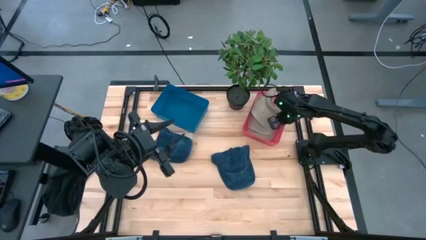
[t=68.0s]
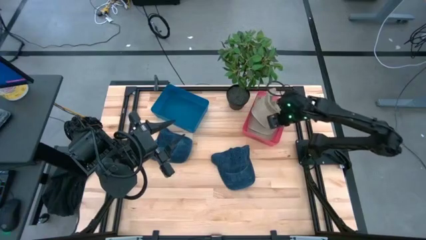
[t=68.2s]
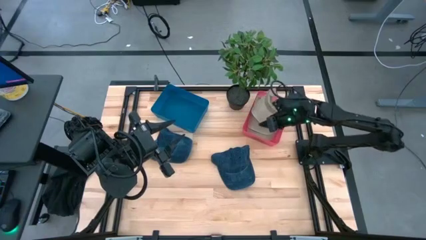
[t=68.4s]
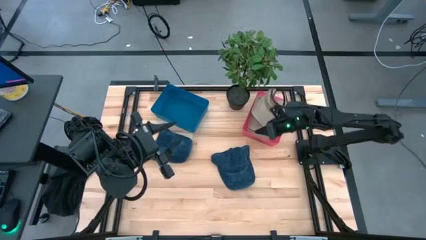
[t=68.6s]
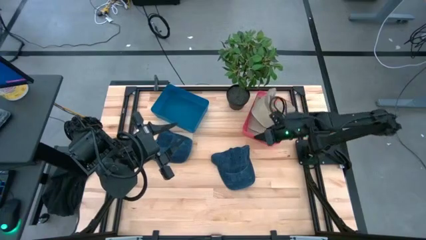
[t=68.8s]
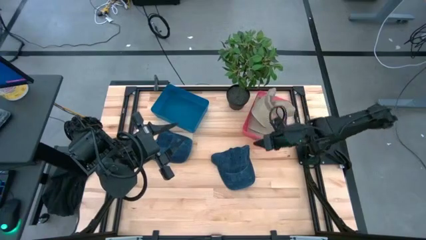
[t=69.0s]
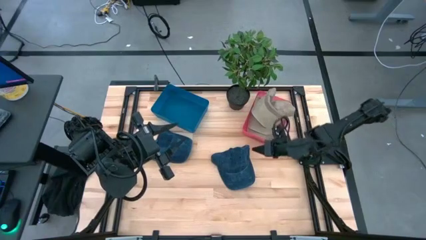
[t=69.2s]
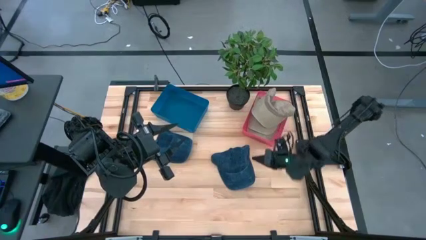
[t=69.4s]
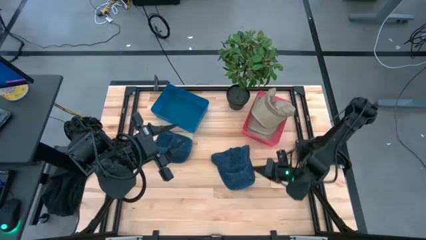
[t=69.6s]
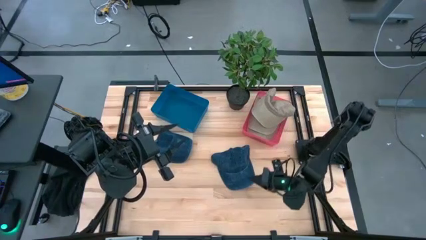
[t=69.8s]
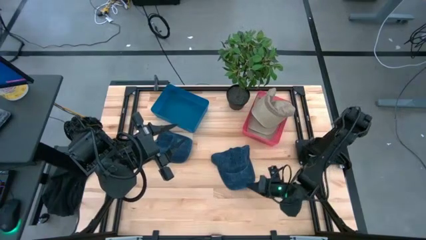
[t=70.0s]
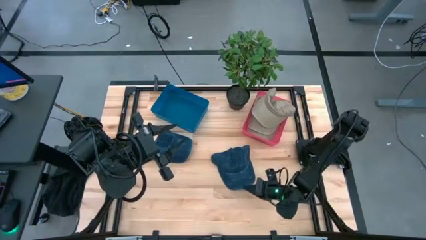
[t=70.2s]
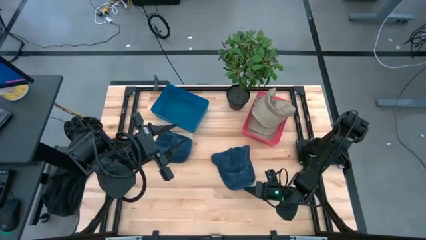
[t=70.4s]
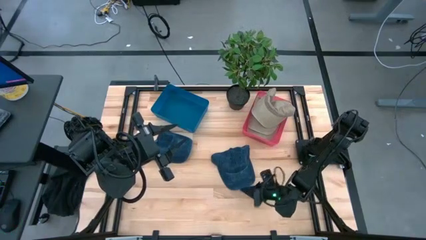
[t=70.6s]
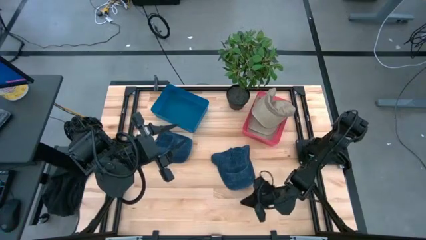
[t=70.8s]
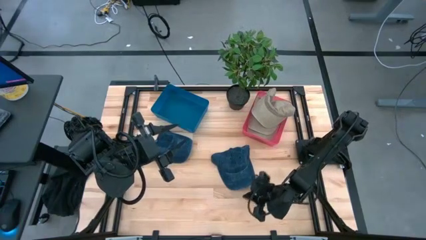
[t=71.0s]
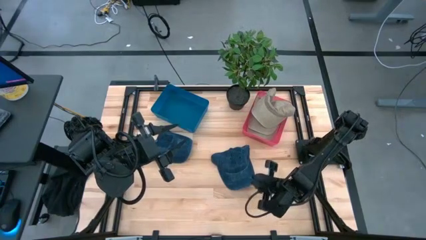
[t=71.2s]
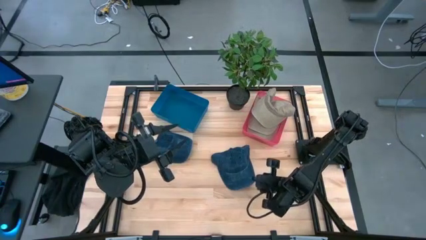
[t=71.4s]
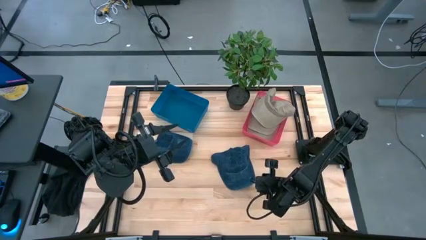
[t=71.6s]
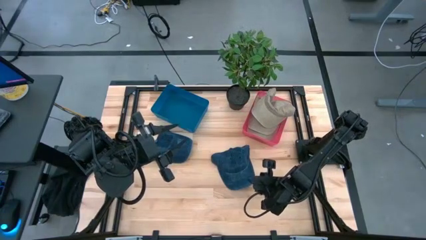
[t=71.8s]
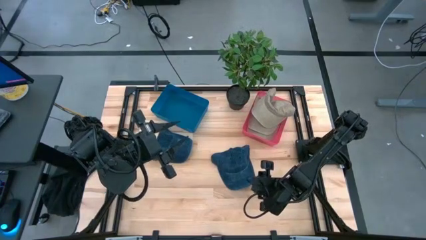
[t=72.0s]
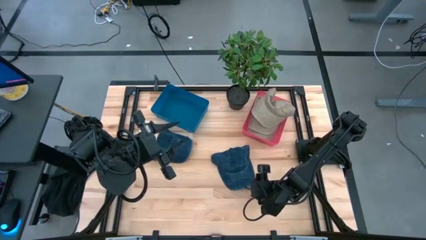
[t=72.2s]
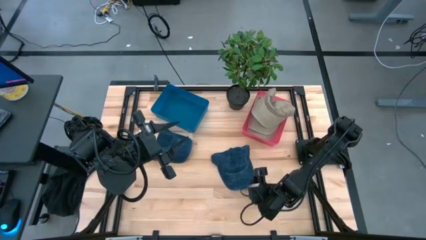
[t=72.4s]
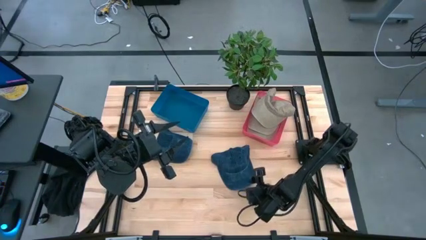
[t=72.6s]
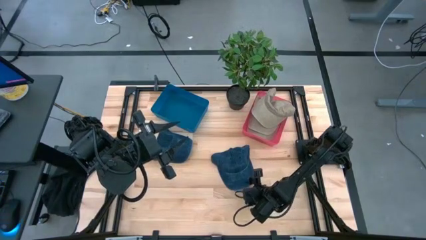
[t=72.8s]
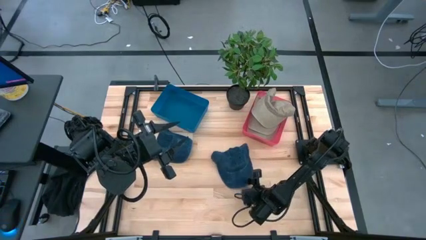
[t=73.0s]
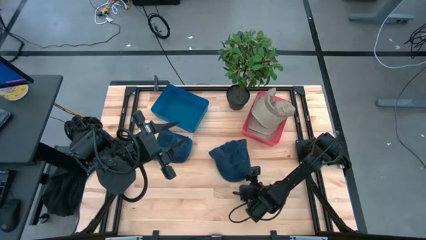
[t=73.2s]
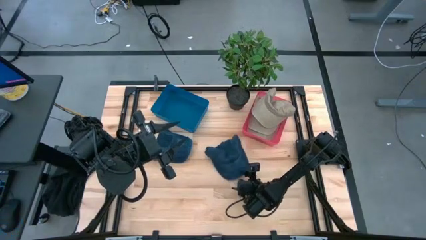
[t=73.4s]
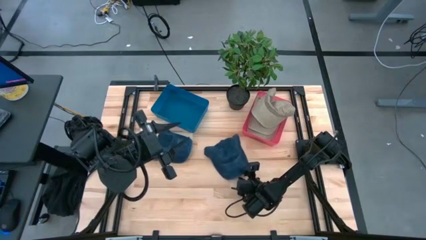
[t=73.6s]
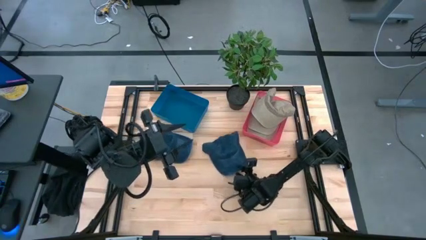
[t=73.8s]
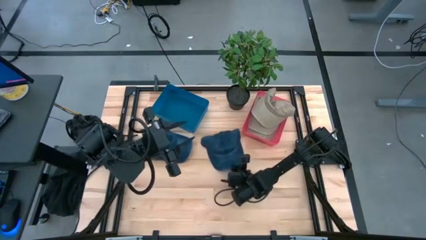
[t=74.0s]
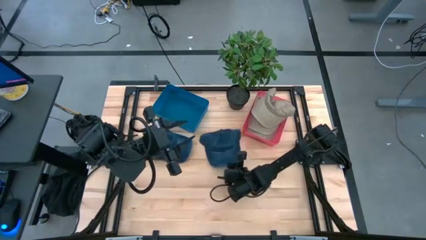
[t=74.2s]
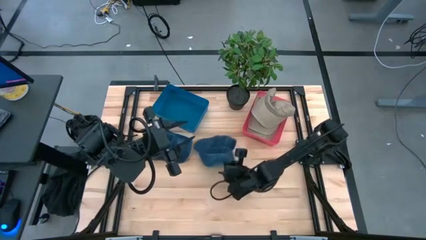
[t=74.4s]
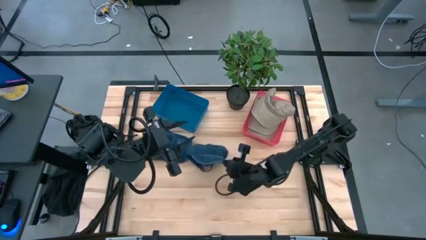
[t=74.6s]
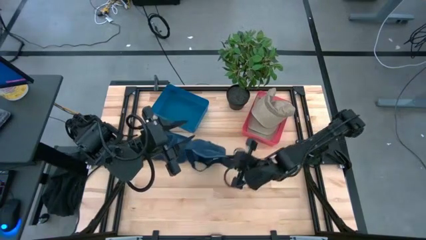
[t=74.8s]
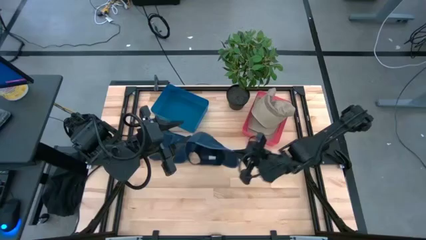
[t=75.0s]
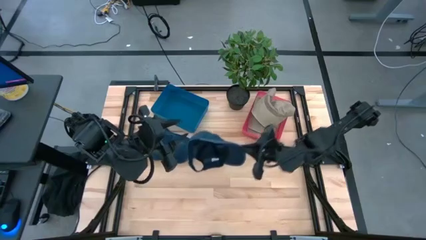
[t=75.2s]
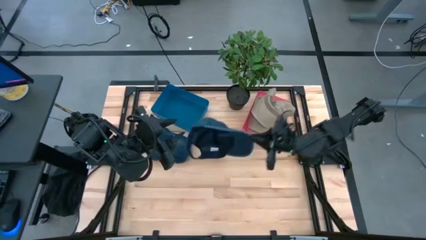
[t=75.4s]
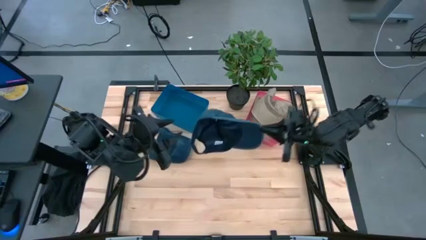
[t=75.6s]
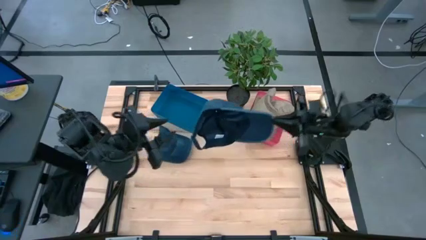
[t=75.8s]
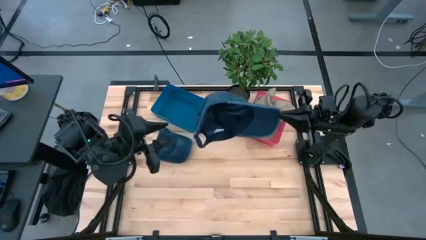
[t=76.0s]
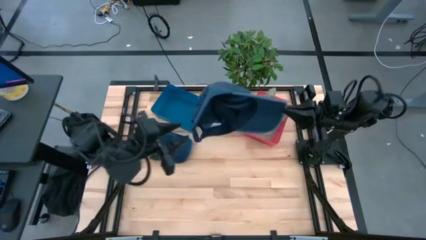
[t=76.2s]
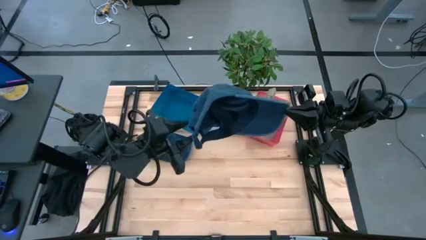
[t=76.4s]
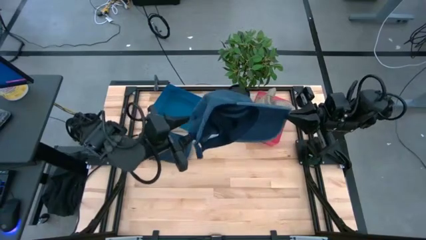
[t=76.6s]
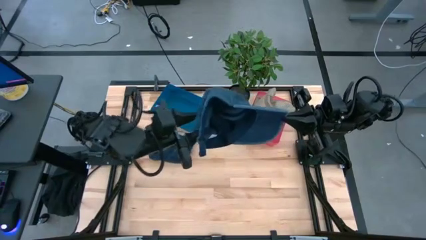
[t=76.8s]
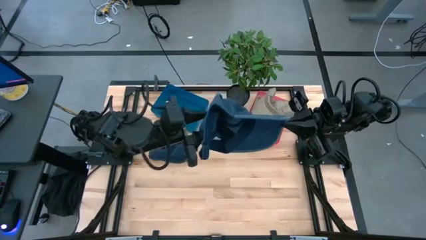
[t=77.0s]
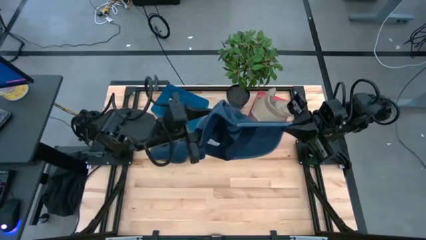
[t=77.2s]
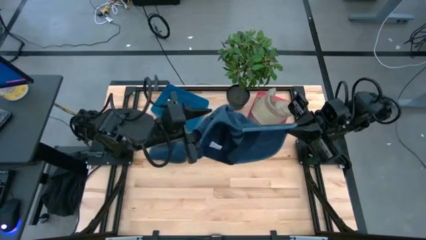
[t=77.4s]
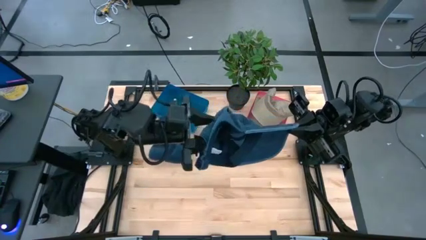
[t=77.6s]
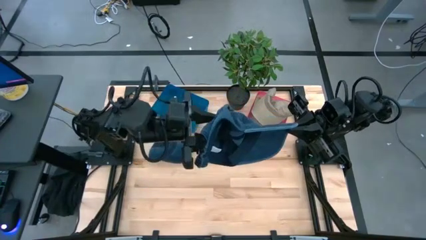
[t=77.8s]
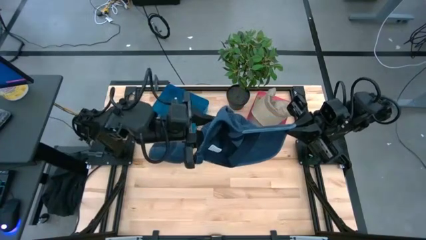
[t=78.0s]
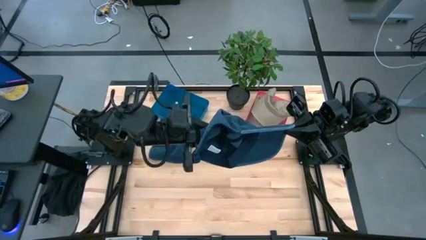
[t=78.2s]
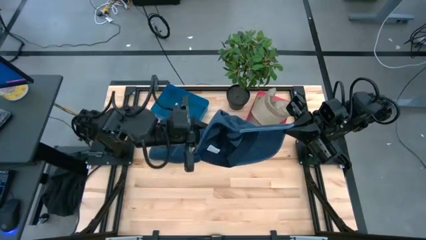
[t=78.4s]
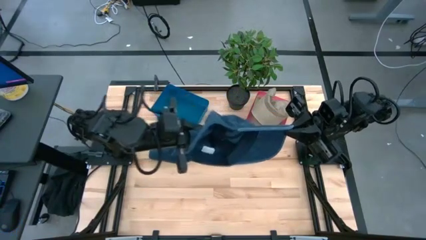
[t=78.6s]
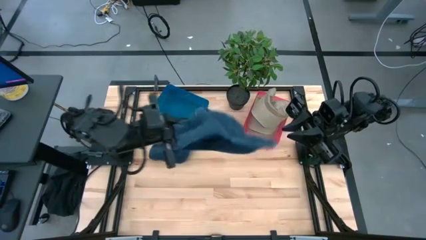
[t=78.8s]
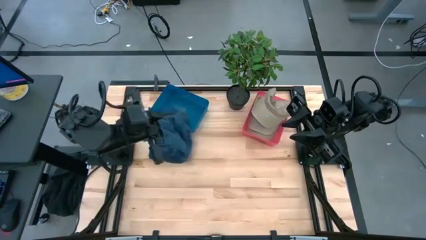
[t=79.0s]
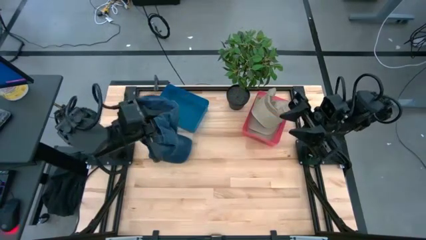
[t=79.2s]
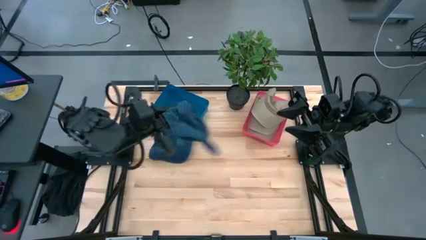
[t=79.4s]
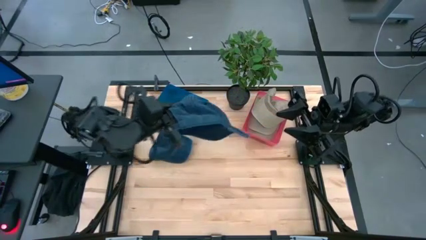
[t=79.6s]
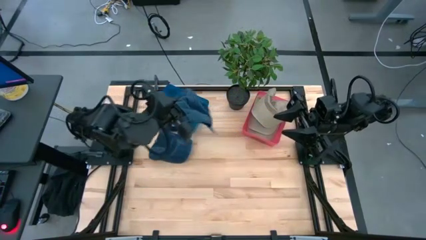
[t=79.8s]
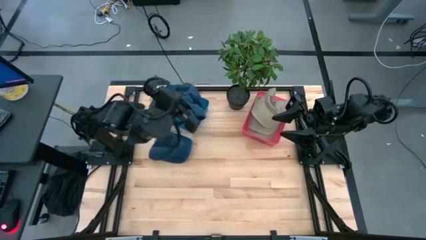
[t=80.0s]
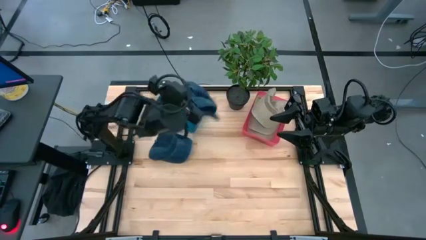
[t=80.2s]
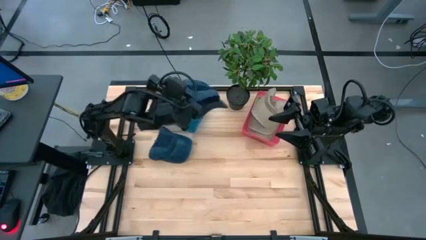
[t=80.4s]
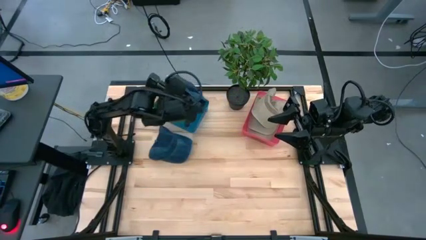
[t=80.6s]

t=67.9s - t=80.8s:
Task: Pick & Place hat
Put the right blue cap into the blue bin
